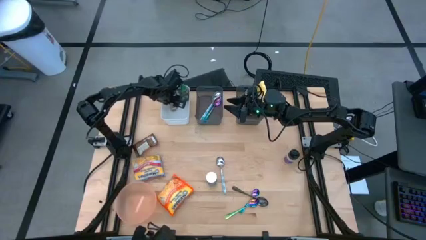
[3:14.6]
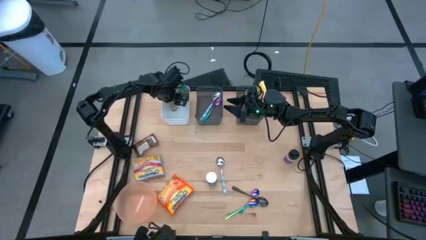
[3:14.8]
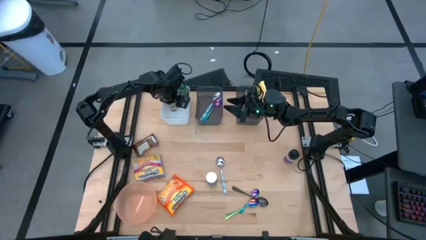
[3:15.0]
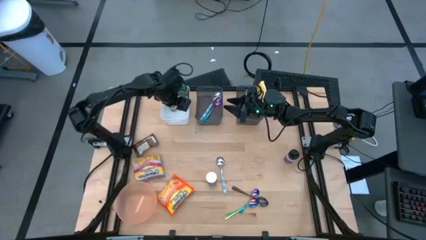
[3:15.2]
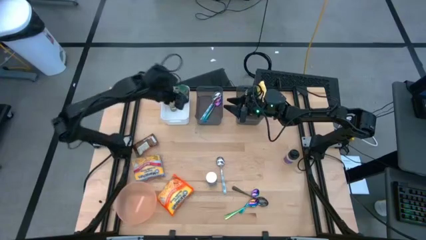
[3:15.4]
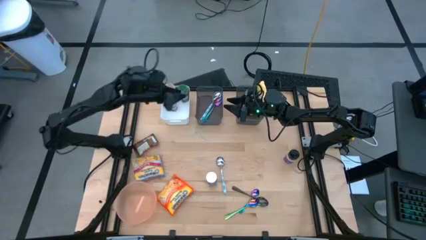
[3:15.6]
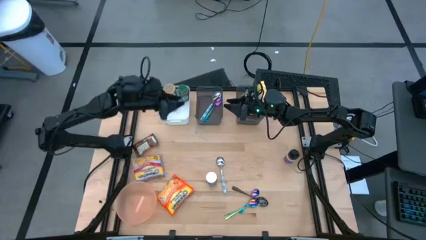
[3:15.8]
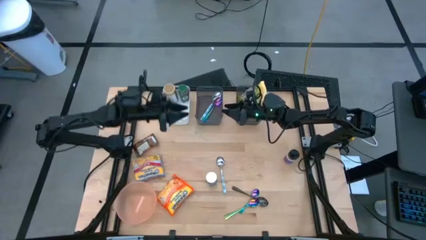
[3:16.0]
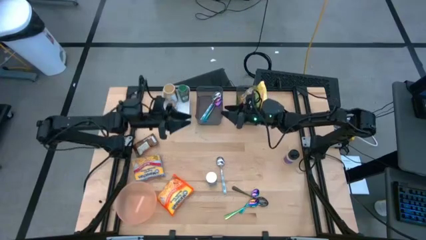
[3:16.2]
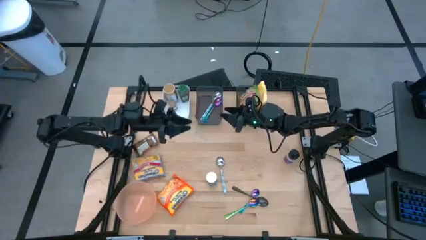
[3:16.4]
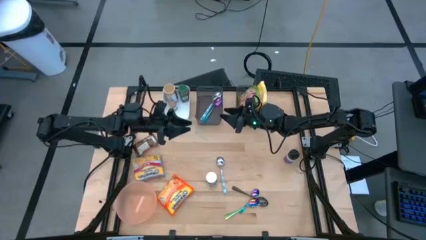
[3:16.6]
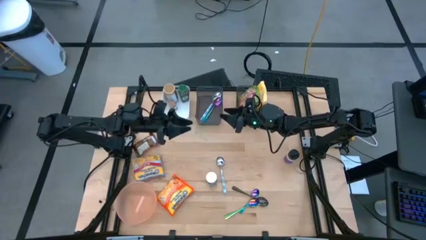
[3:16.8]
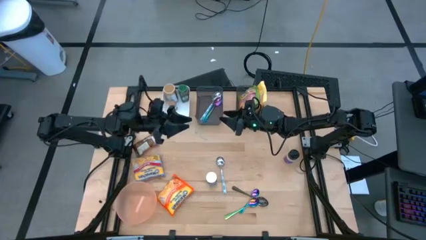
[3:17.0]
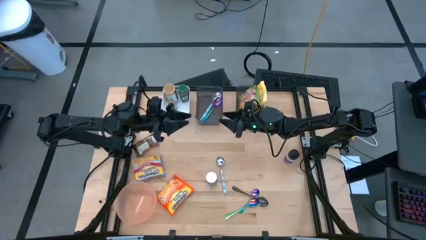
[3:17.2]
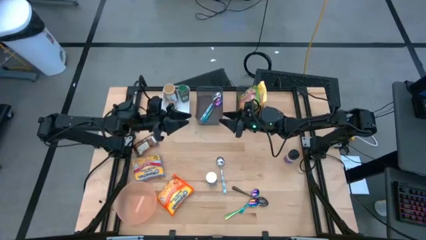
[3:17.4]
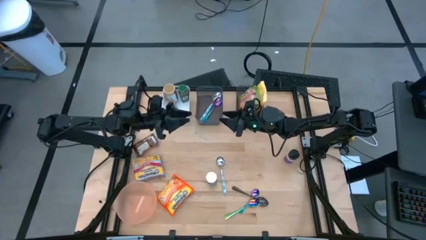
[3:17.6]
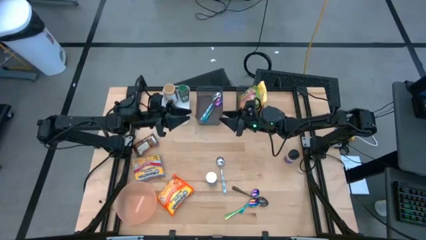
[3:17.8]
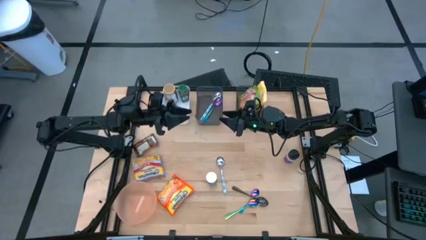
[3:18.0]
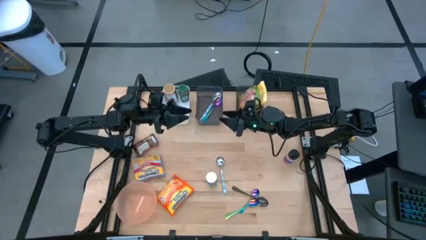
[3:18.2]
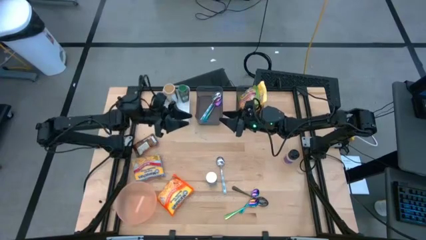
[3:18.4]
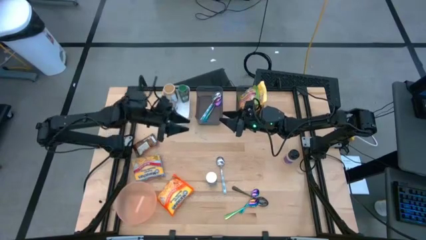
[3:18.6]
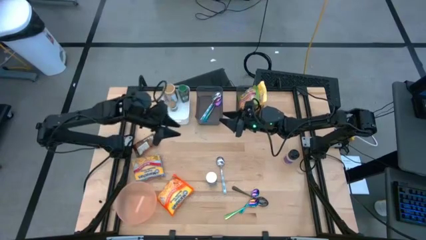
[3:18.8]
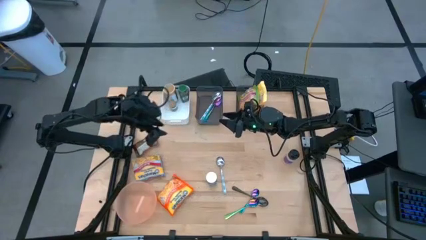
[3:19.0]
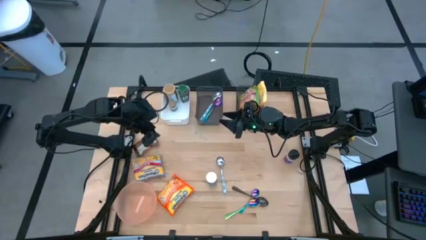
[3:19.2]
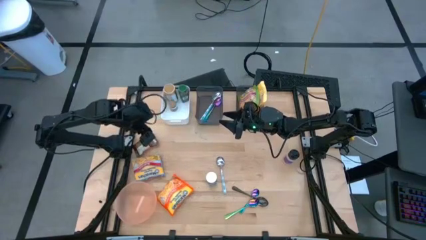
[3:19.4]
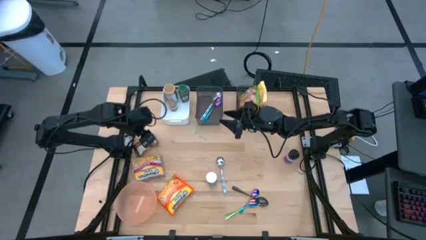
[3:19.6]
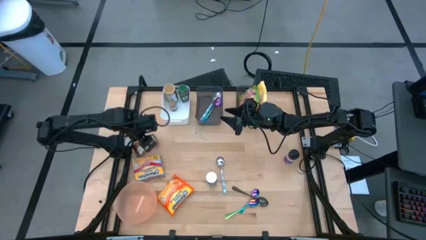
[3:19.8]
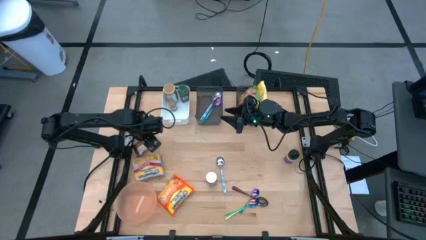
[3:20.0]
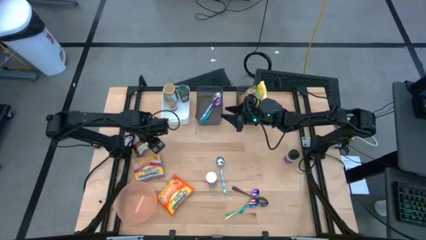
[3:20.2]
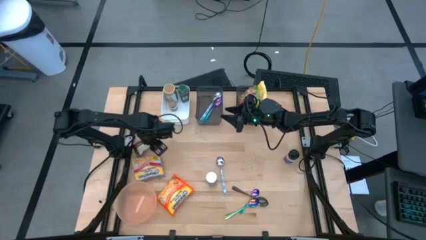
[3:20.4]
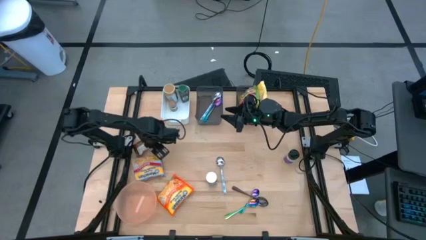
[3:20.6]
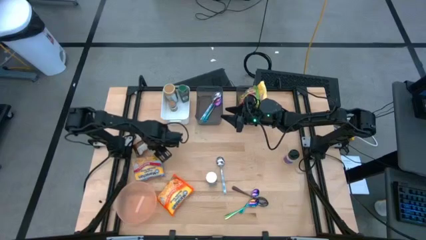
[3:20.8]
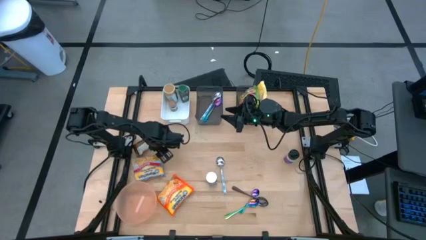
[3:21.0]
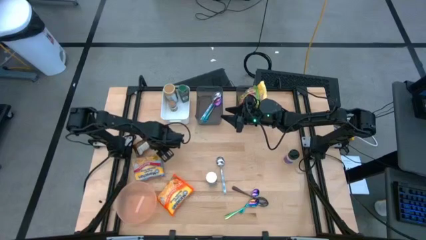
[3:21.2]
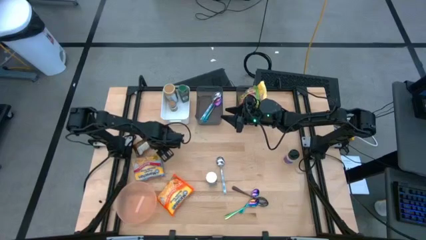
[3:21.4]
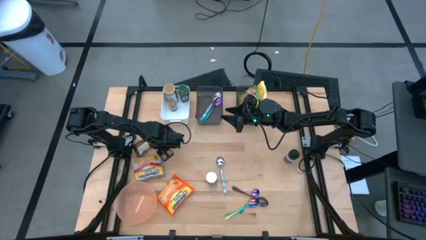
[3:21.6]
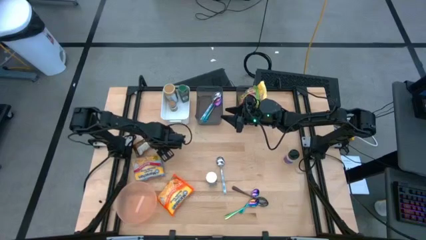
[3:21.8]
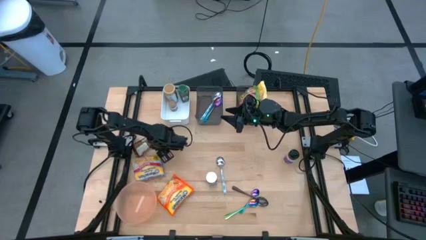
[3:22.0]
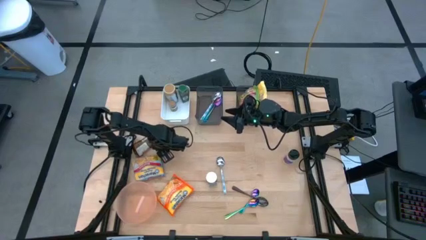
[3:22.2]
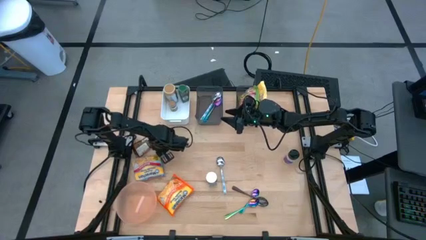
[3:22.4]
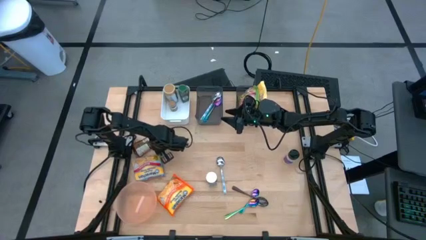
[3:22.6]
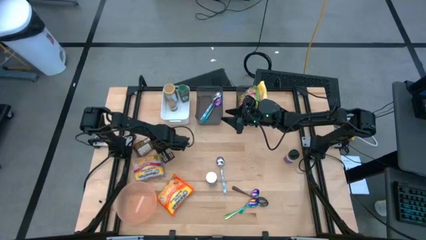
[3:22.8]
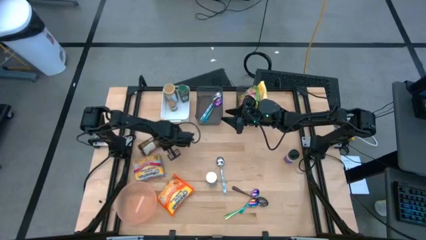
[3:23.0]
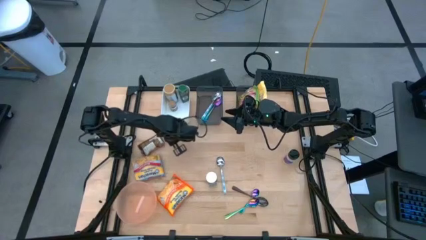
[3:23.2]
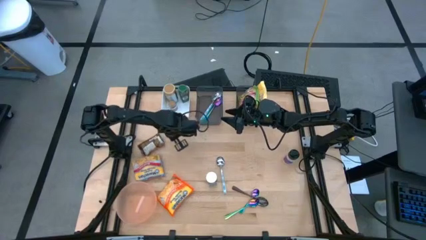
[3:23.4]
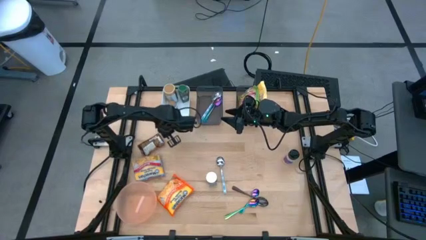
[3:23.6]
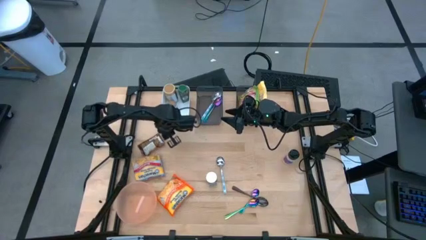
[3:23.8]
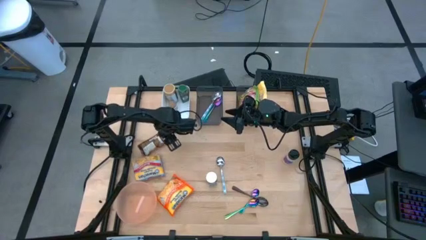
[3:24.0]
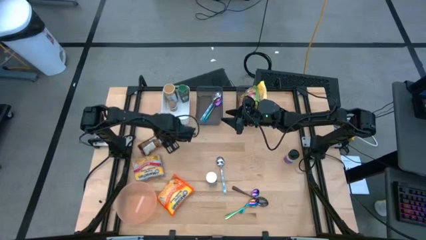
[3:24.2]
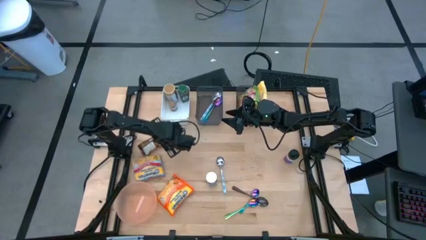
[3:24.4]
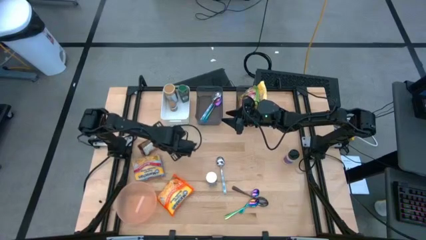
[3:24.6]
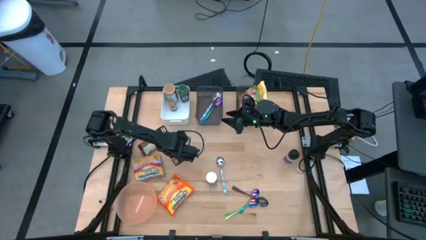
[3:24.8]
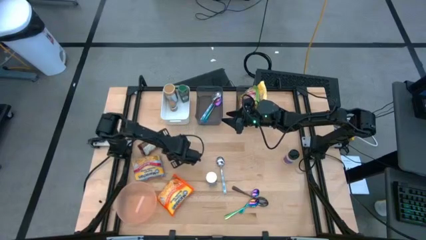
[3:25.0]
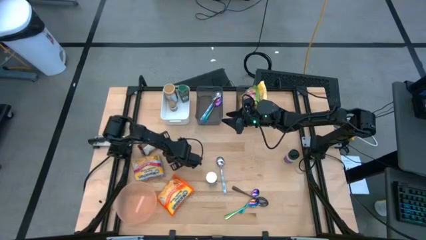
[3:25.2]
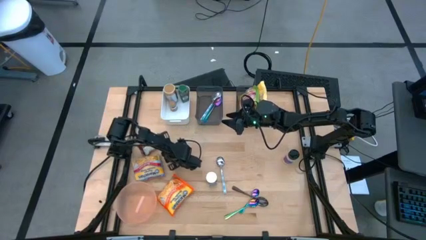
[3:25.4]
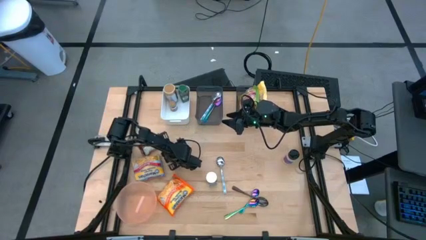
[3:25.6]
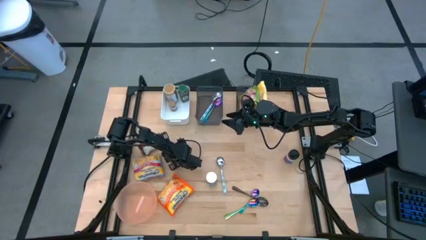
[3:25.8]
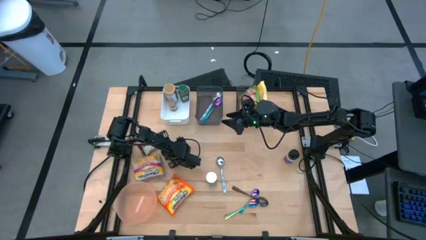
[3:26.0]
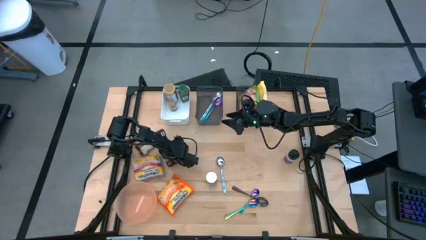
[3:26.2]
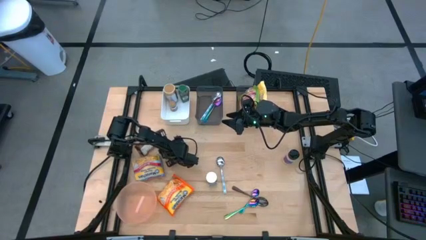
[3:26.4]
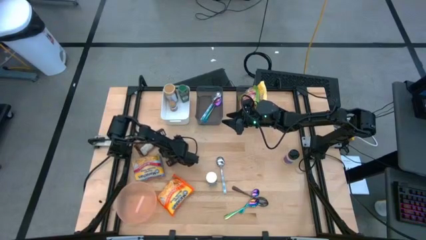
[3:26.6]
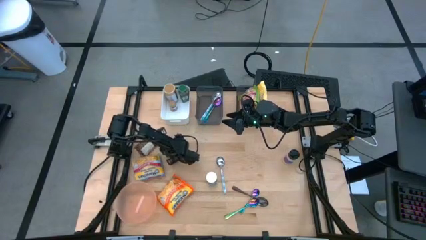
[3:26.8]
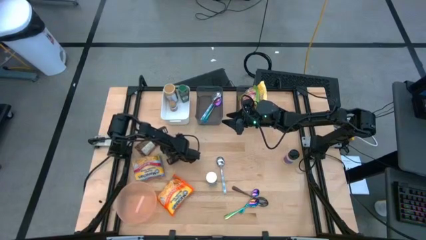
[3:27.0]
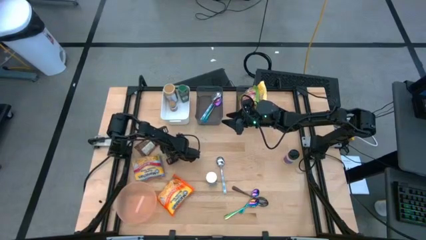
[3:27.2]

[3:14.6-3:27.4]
Task: Pick & Place Food Item
Put the orange seasoning bag into the white bin

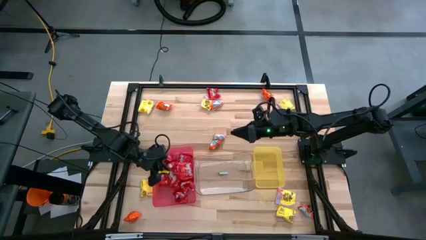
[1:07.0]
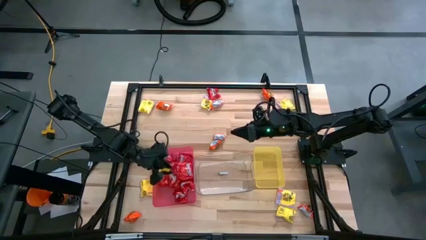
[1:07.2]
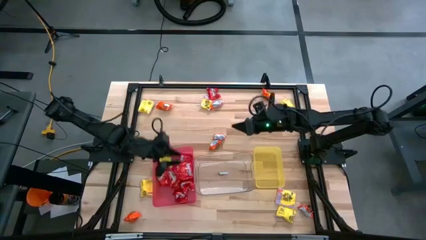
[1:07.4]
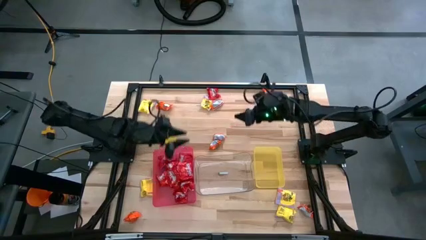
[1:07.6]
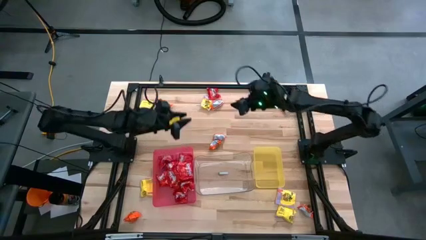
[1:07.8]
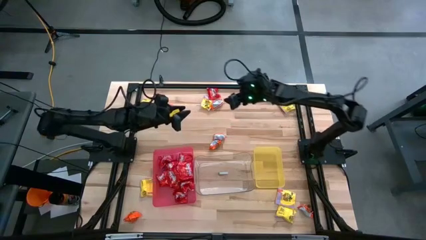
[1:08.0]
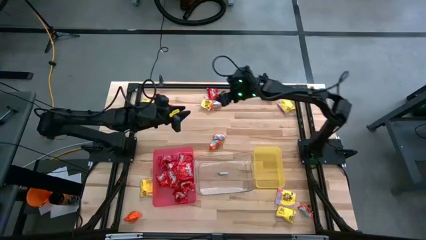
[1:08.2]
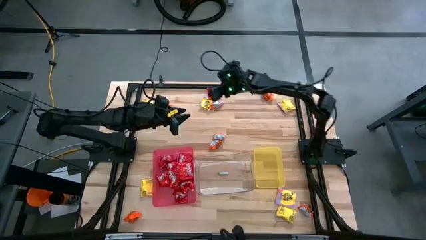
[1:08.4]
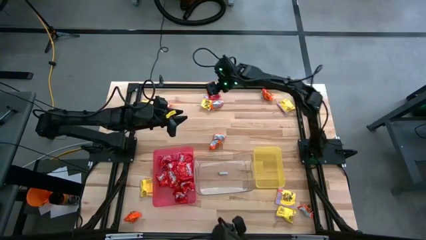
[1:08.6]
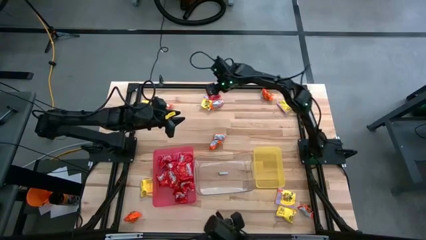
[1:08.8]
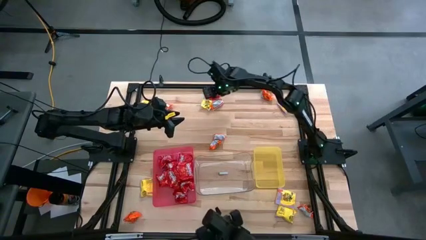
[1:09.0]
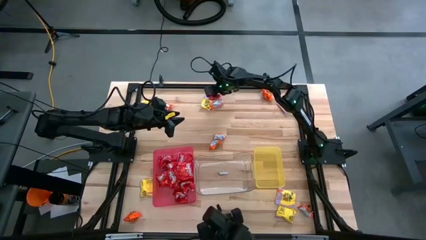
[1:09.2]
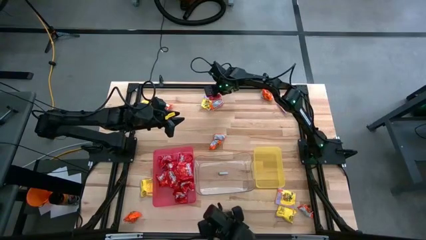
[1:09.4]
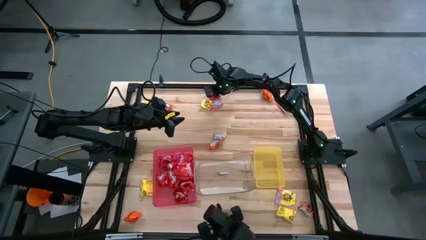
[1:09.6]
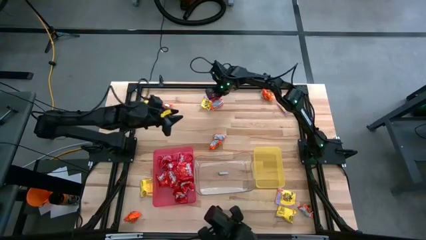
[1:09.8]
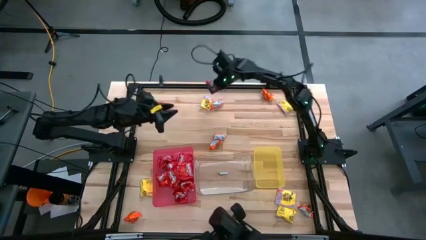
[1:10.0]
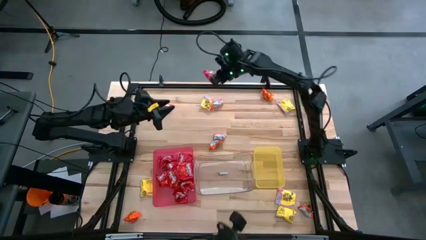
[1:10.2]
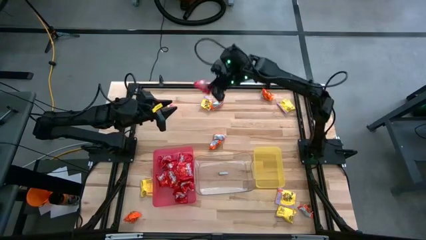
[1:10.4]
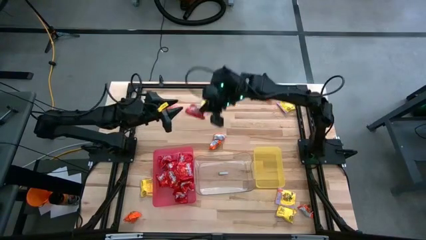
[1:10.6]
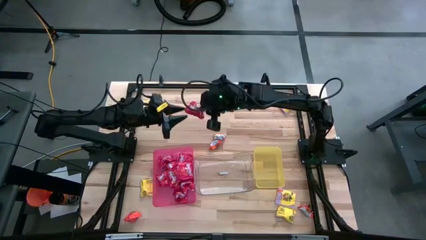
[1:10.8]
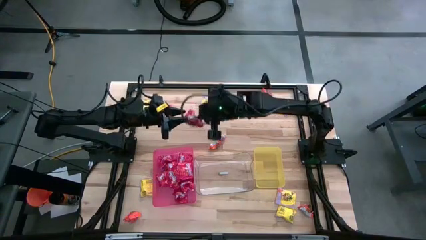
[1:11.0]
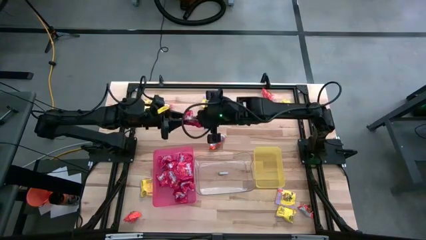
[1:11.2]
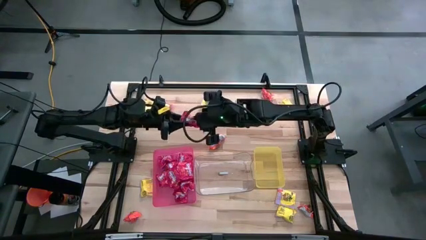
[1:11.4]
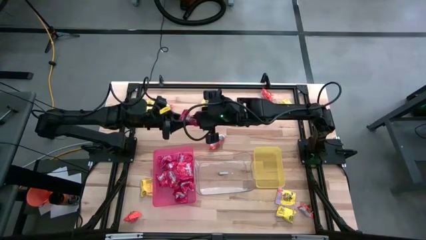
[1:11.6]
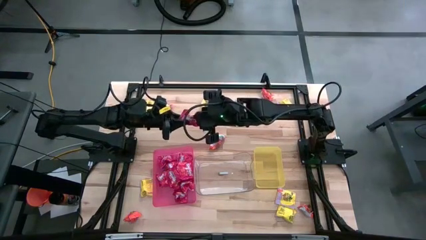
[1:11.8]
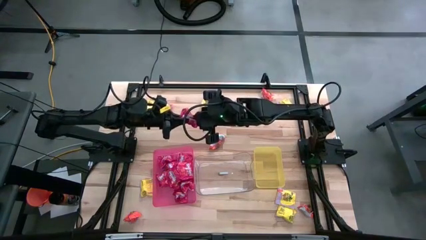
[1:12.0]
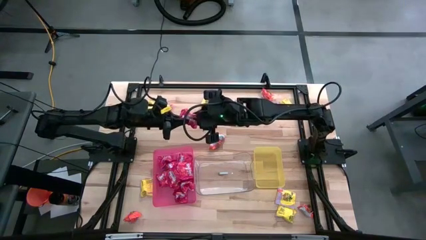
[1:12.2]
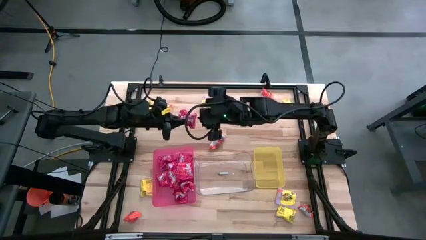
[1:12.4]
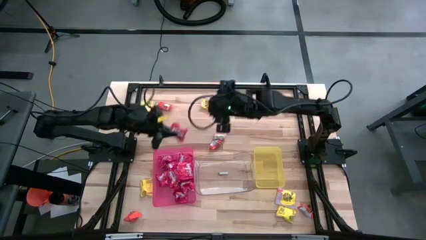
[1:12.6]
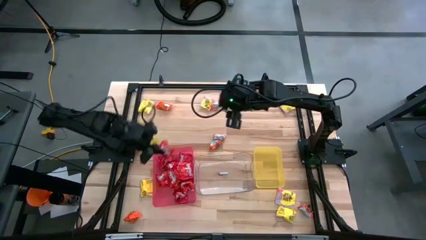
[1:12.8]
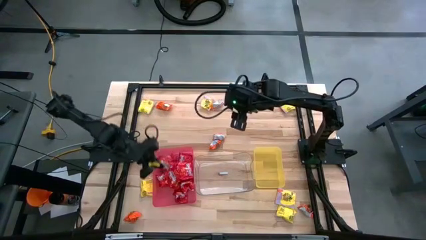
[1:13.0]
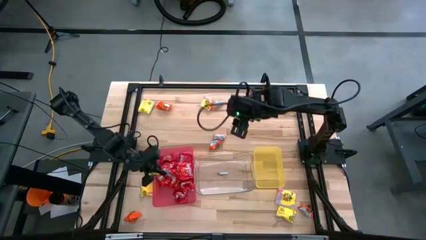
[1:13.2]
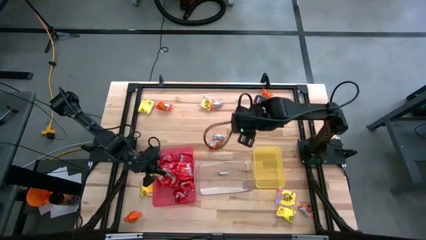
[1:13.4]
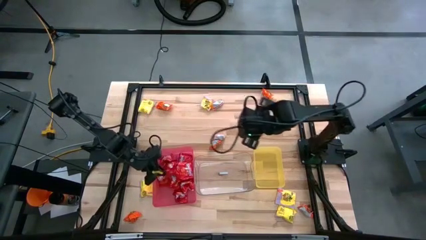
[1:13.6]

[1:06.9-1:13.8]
Task: Sort candy
Put the red candy into the red bin
